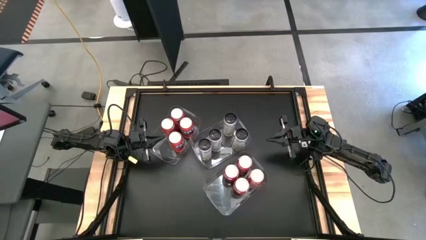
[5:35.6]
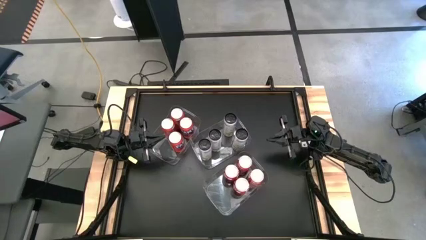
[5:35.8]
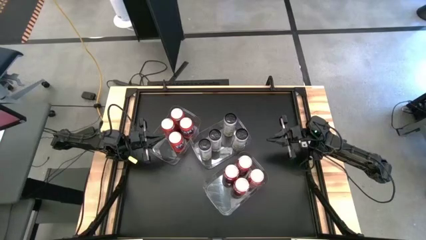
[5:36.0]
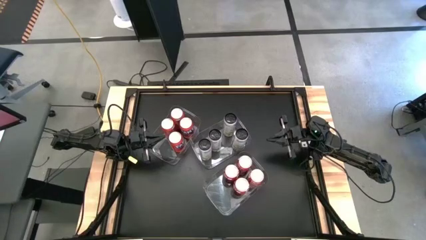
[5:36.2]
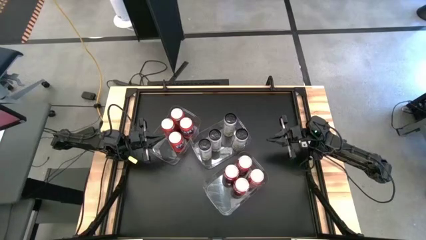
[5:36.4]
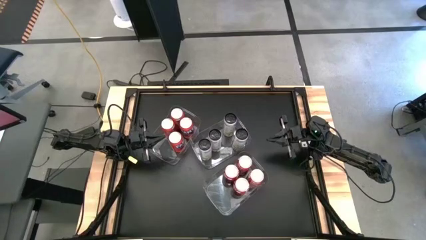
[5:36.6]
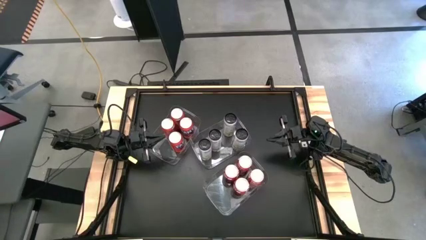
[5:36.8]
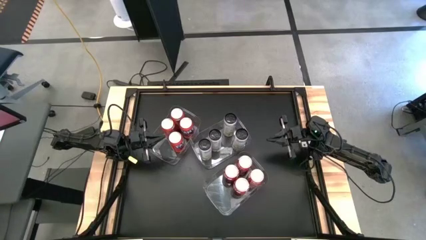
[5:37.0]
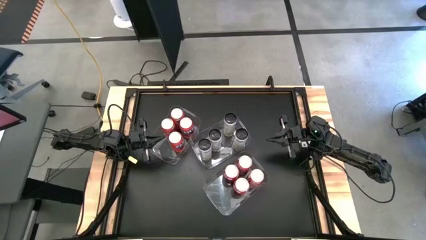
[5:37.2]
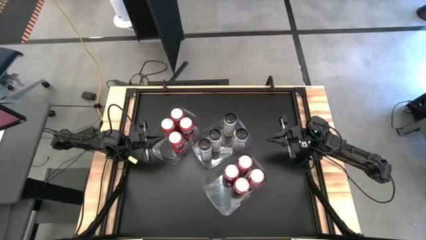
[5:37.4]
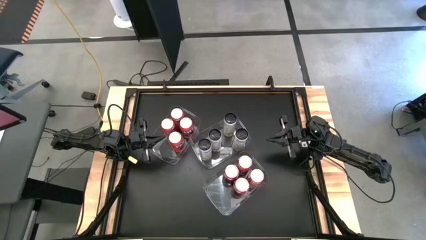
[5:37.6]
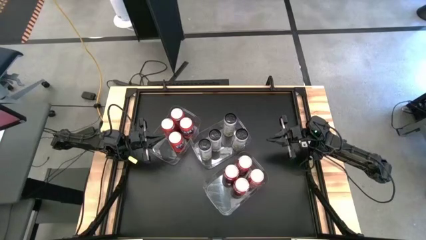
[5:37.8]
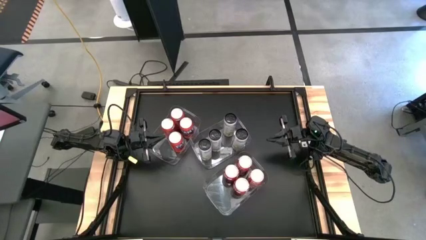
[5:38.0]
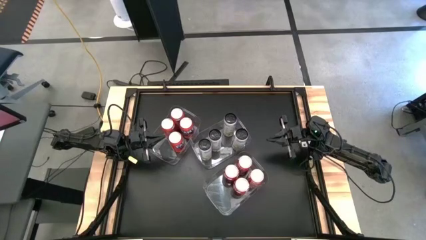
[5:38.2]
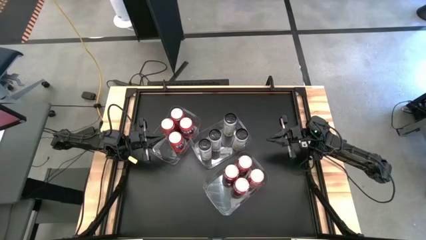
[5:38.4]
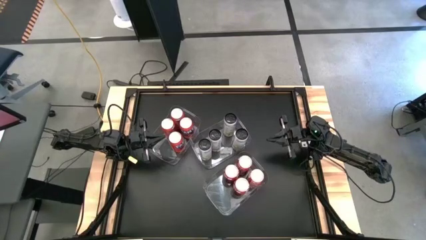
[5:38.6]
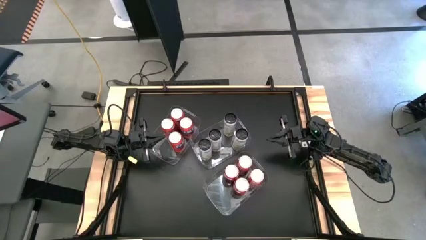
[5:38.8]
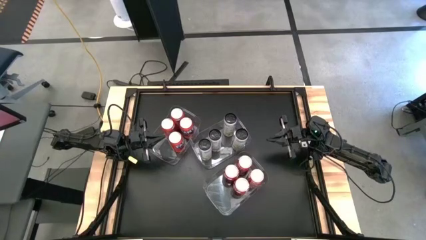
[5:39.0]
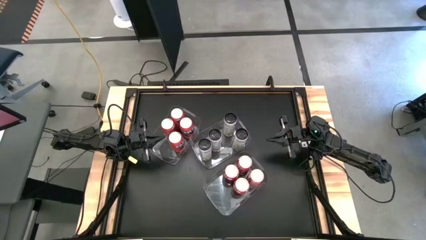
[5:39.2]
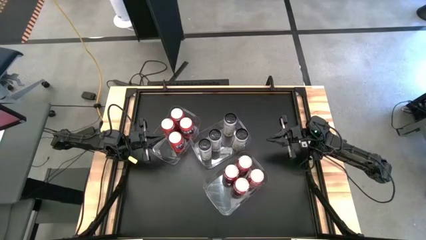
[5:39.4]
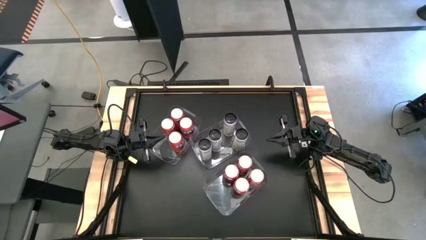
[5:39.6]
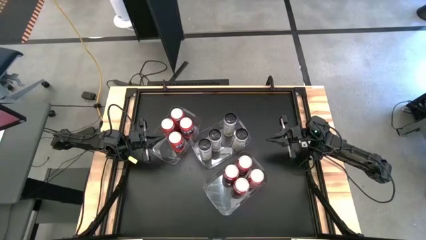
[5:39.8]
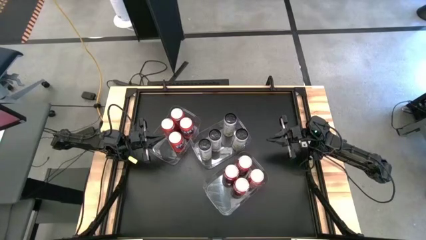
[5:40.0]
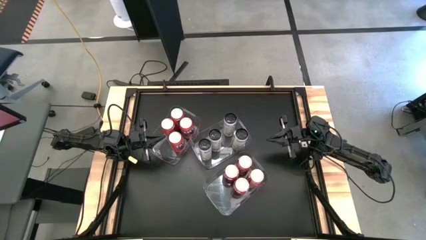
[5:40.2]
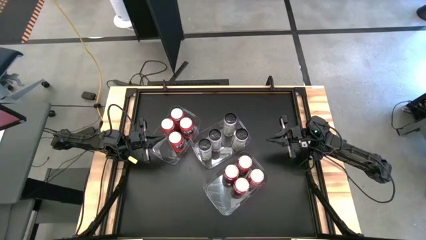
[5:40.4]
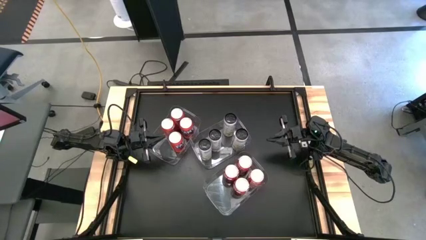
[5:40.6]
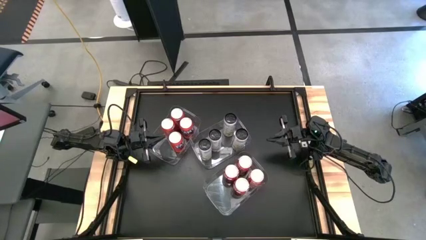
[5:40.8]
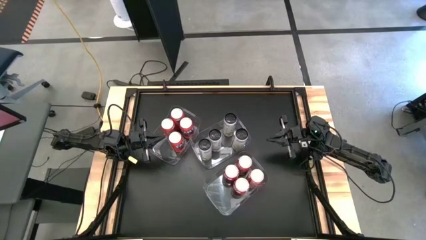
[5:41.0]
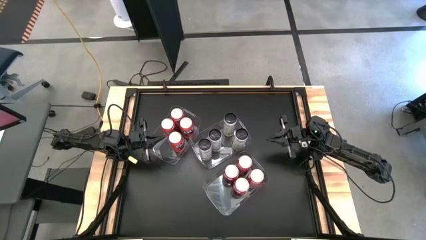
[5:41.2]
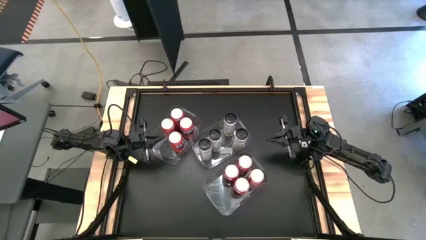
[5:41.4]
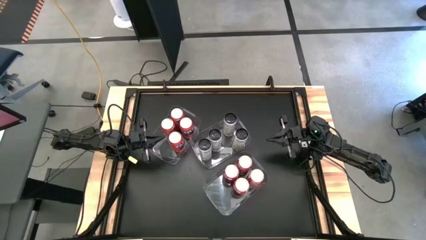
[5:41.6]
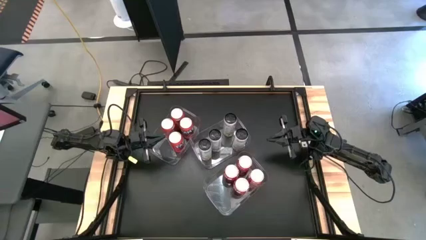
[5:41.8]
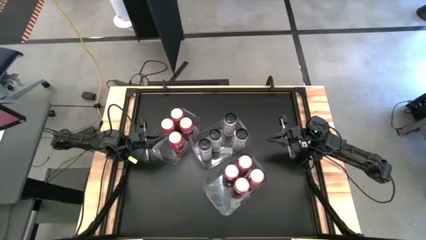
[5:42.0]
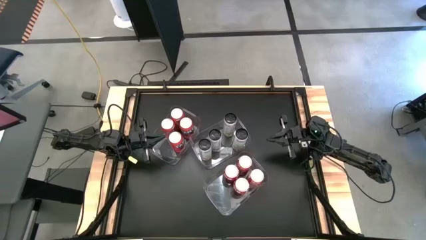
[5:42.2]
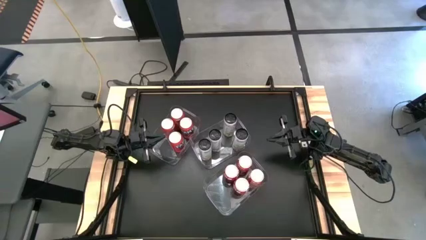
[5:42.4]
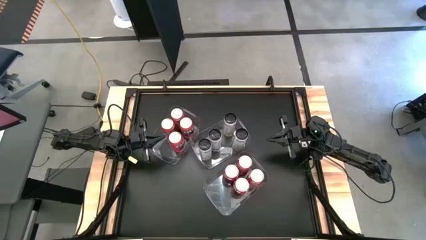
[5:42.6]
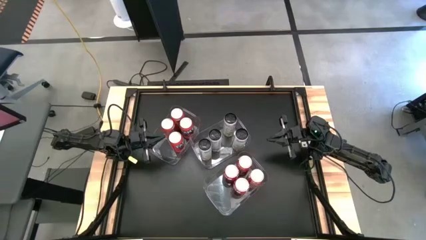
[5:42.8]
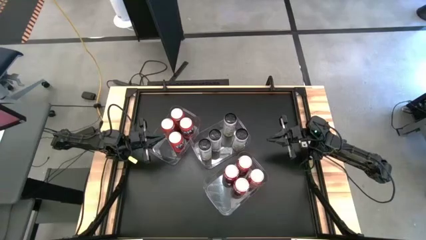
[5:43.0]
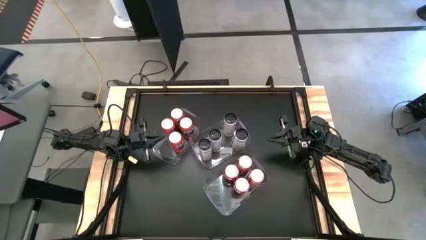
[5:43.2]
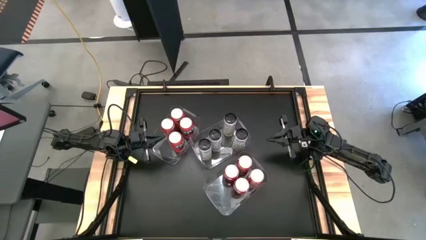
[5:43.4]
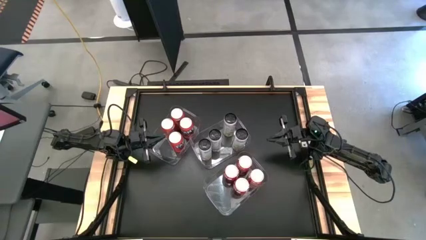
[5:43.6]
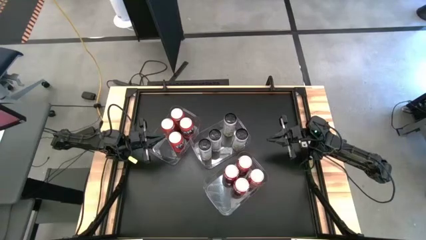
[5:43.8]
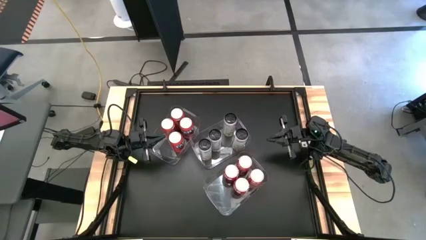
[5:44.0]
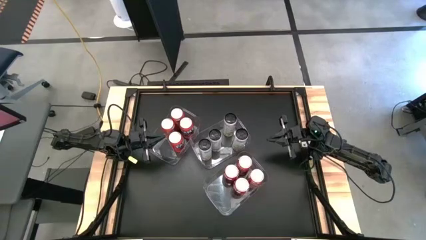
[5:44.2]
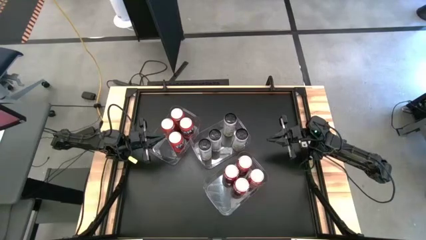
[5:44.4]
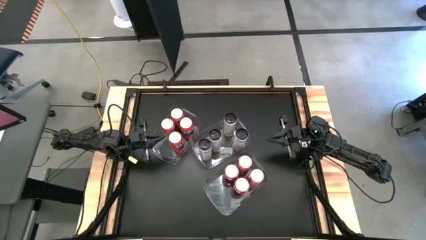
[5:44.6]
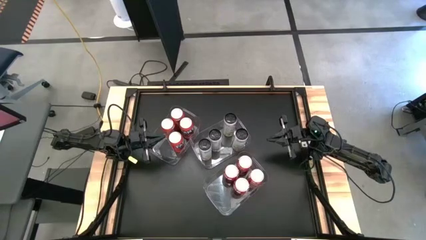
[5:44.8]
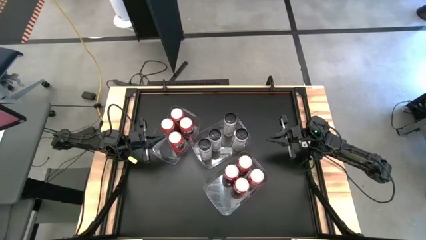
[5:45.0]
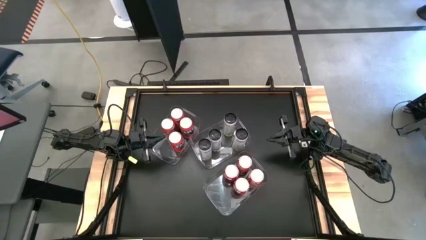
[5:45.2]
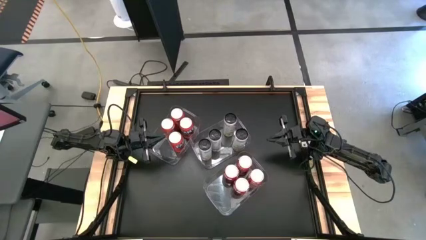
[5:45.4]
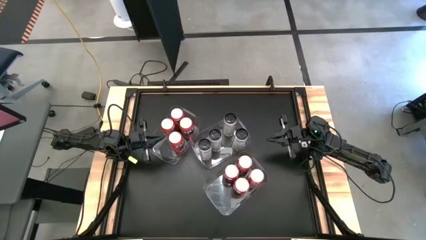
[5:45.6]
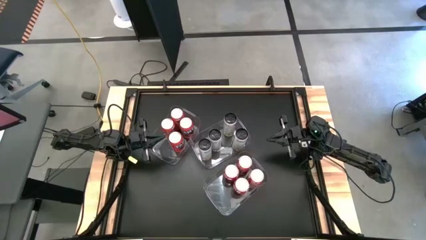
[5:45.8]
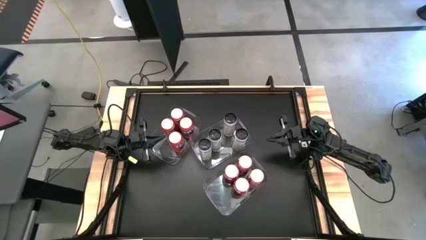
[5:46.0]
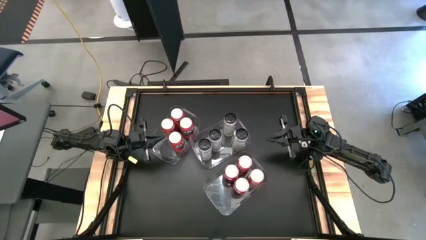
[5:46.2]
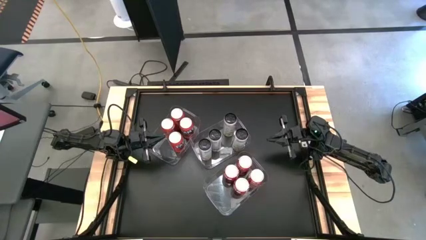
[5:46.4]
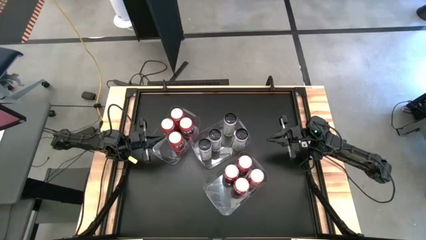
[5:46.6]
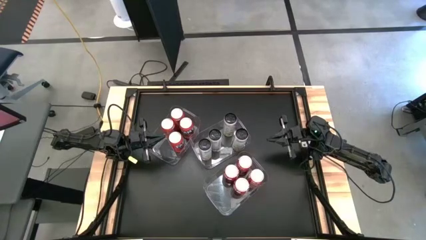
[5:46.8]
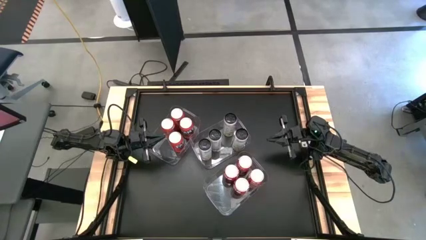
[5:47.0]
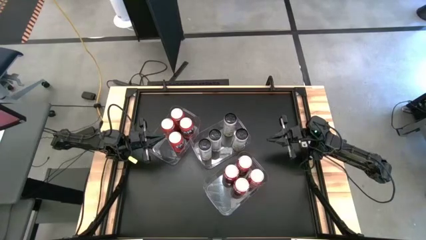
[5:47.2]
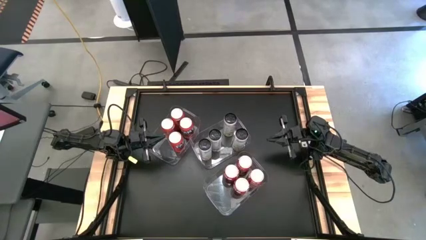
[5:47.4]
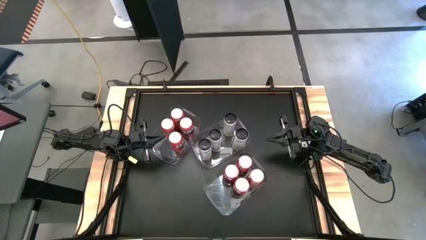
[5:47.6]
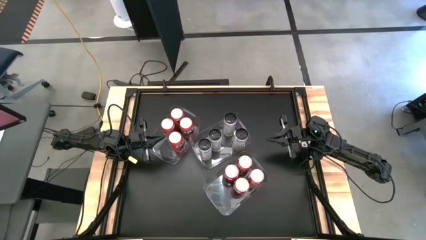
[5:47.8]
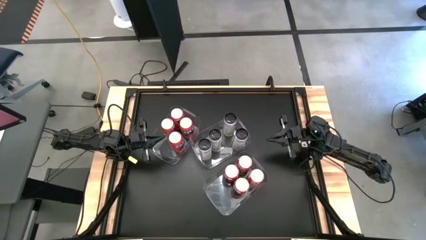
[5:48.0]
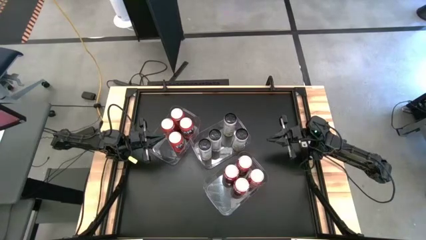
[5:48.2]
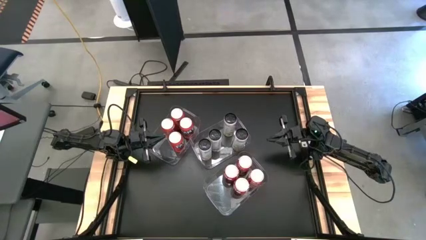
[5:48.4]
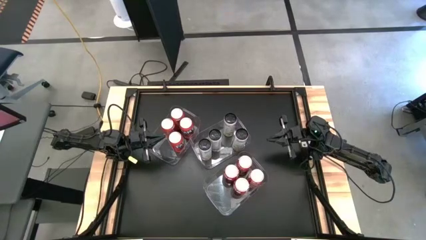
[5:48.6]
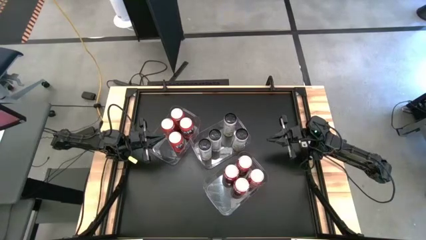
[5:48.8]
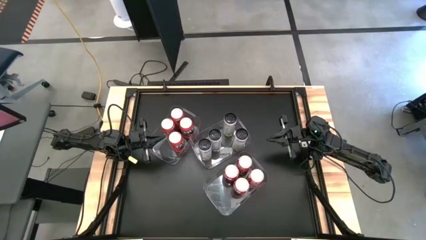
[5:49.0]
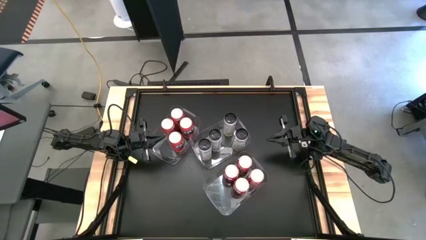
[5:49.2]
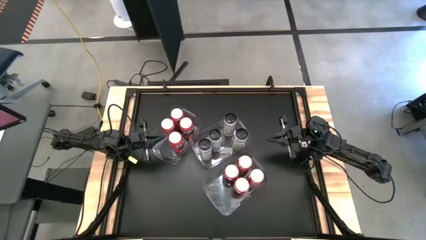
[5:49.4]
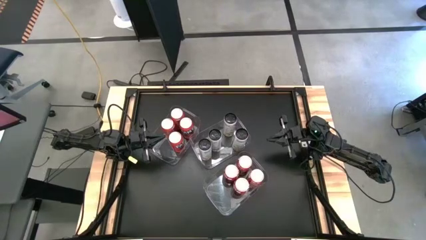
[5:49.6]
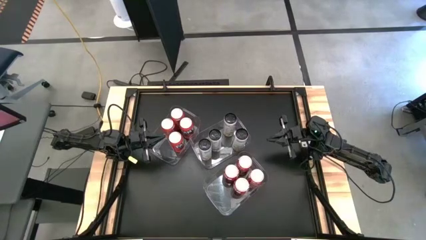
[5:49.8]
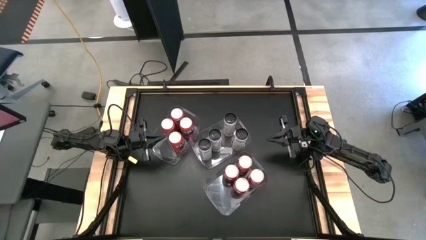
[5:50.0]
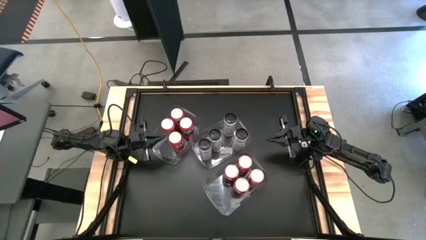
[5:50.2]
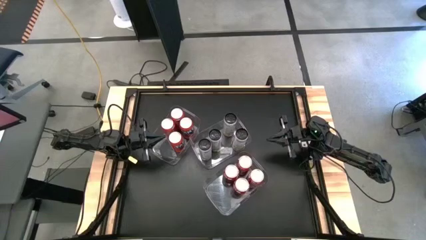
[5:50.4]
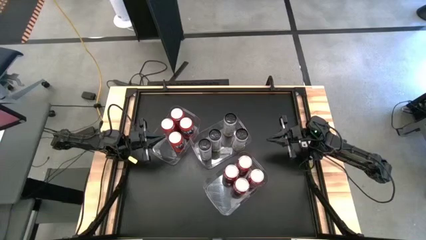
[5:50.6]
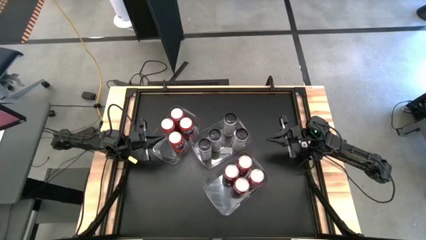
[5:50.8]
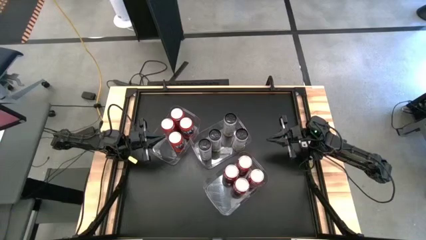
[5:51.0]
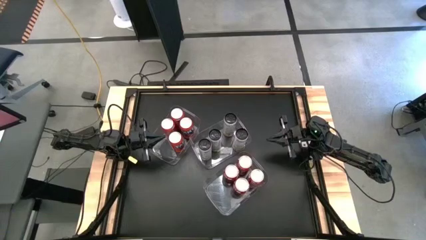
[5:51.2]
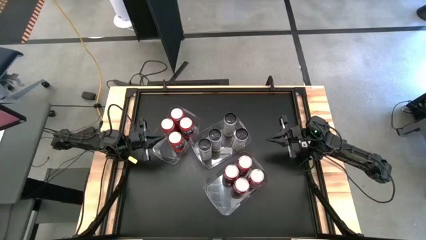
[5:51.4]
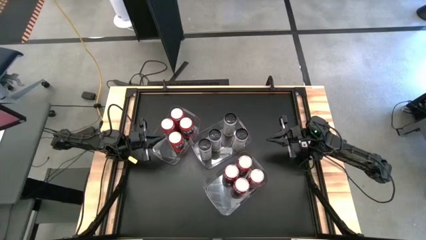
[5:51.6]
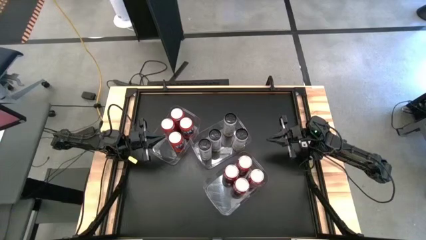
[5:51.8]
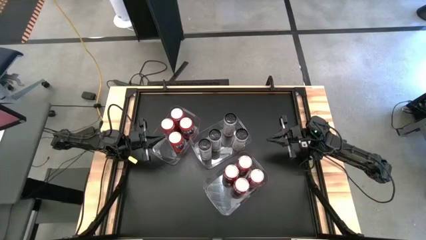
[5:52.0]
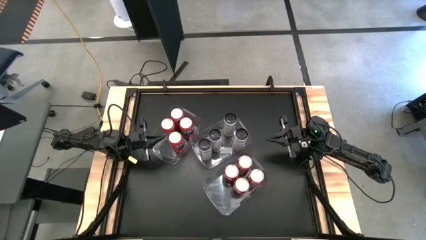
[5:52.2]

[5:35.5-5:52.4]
Task: Sort soda cans
Return to Home Position
